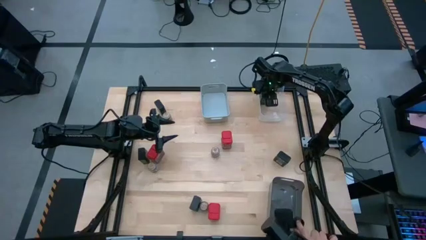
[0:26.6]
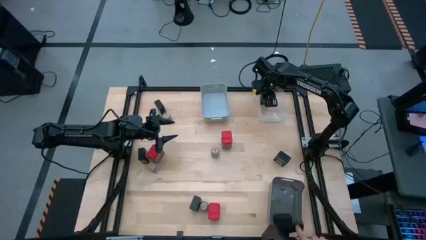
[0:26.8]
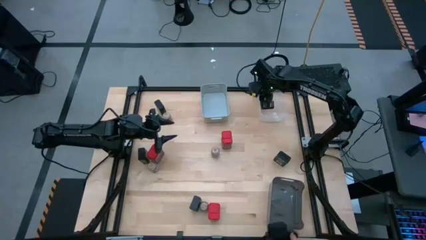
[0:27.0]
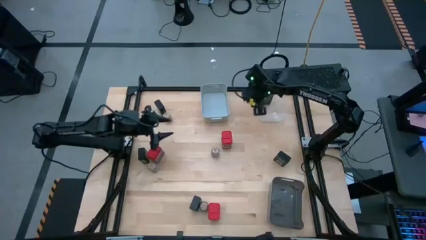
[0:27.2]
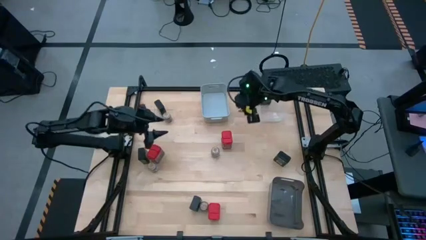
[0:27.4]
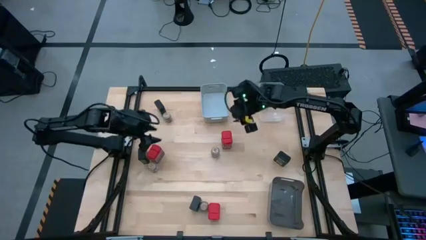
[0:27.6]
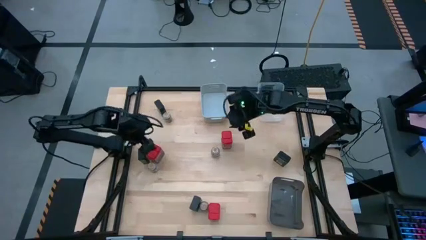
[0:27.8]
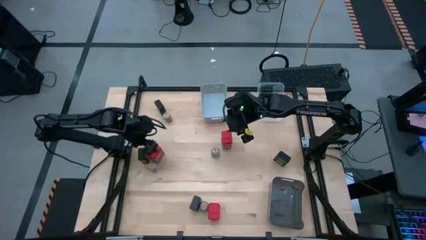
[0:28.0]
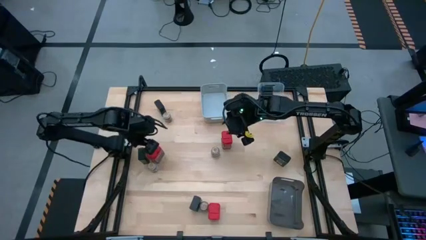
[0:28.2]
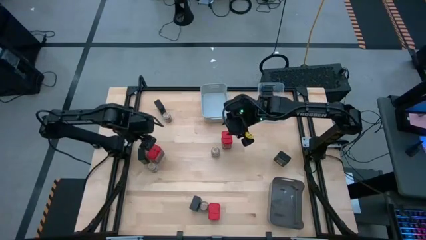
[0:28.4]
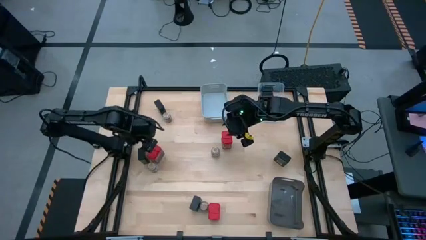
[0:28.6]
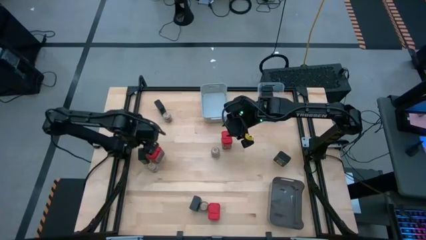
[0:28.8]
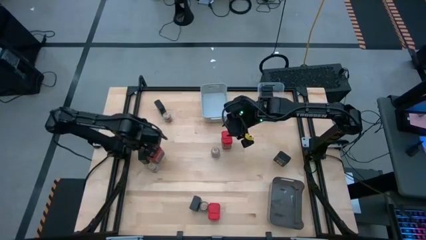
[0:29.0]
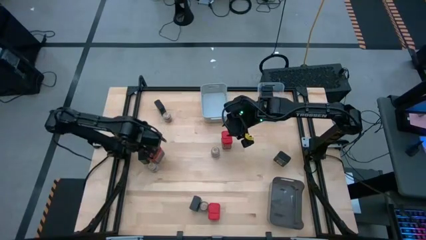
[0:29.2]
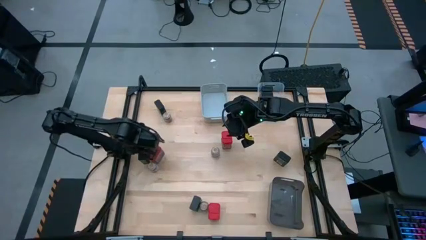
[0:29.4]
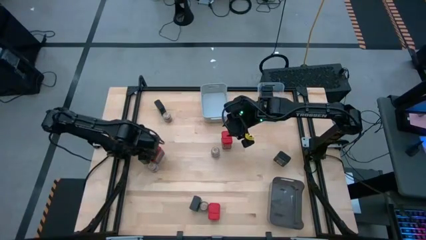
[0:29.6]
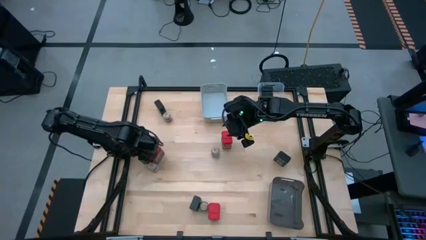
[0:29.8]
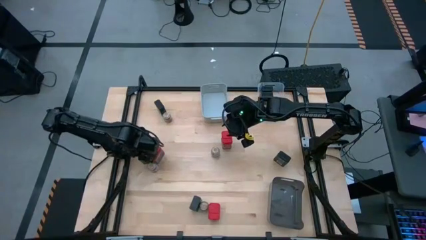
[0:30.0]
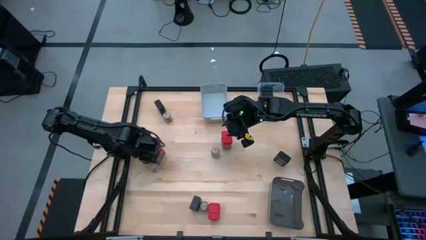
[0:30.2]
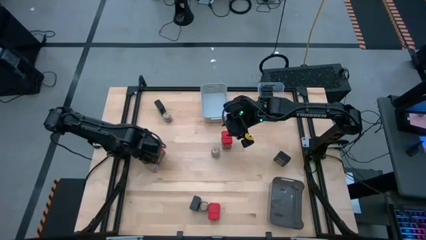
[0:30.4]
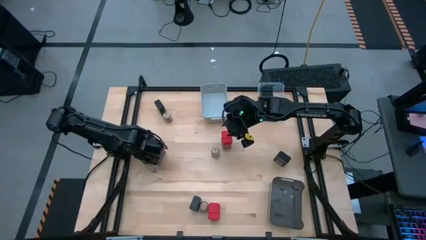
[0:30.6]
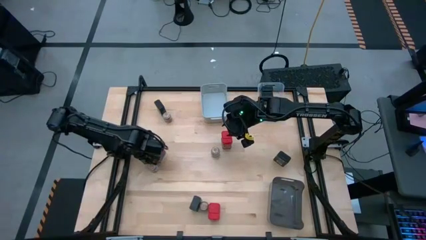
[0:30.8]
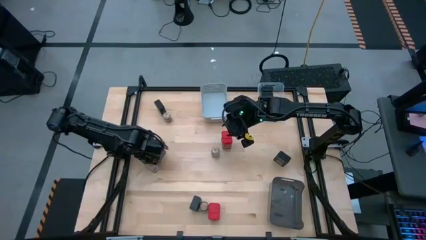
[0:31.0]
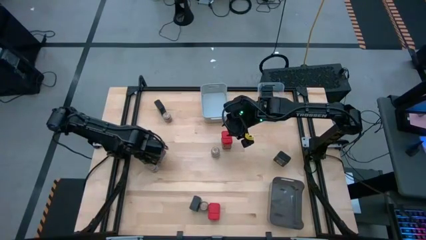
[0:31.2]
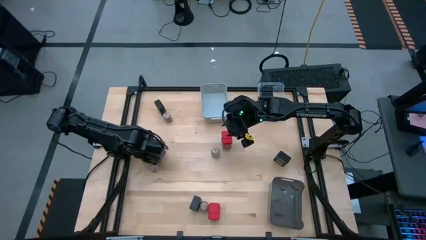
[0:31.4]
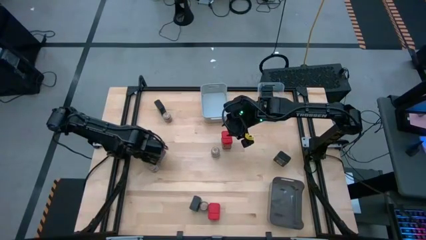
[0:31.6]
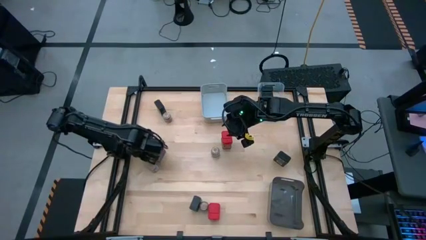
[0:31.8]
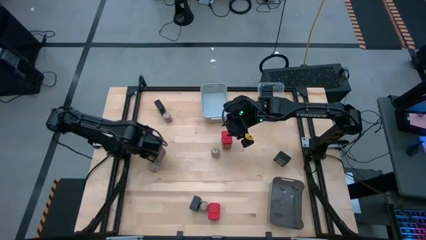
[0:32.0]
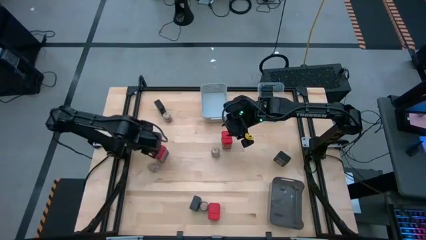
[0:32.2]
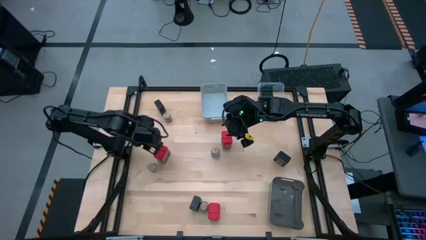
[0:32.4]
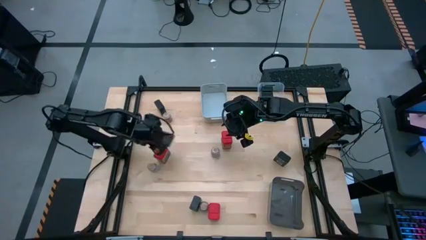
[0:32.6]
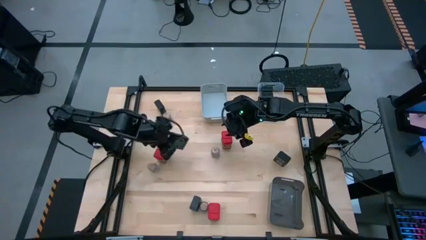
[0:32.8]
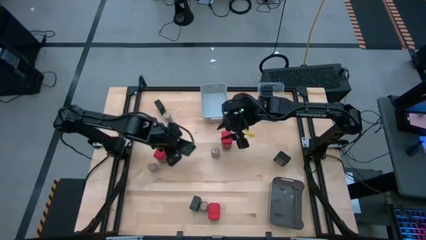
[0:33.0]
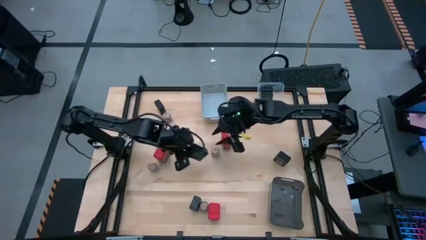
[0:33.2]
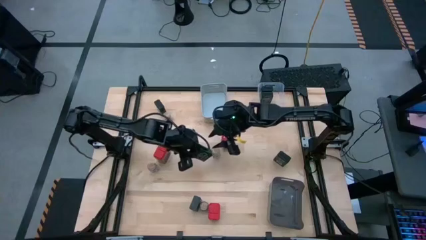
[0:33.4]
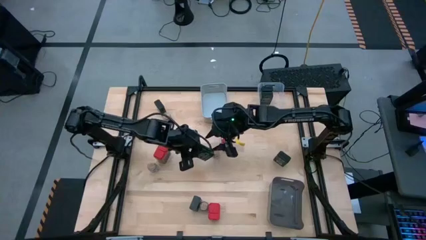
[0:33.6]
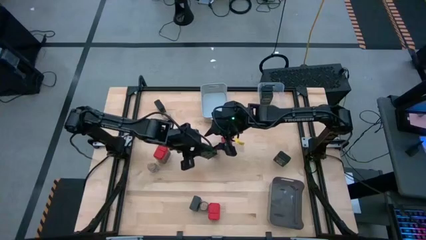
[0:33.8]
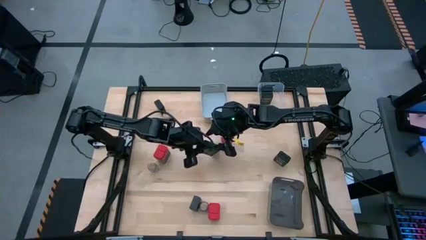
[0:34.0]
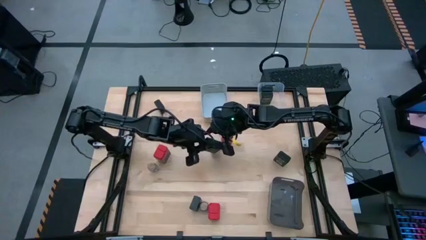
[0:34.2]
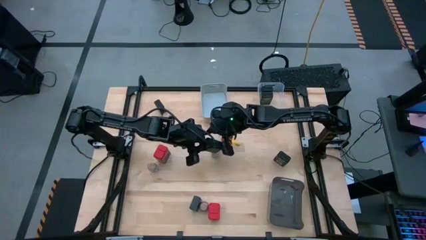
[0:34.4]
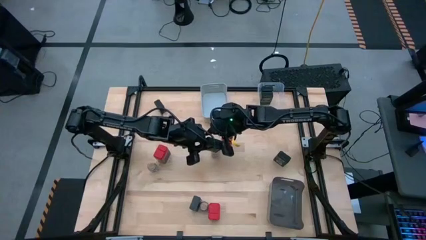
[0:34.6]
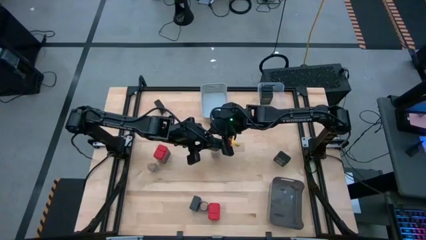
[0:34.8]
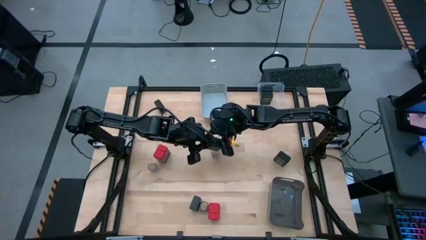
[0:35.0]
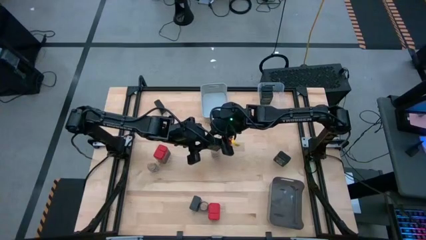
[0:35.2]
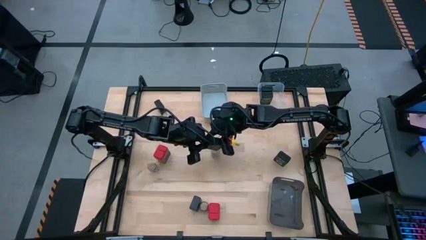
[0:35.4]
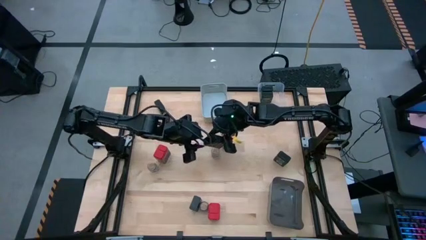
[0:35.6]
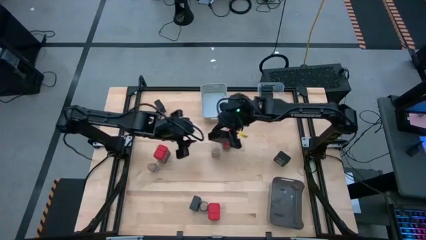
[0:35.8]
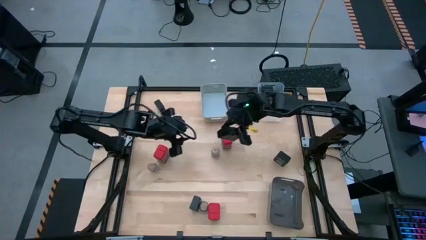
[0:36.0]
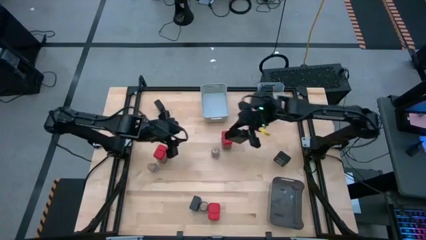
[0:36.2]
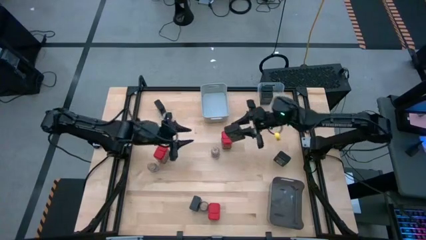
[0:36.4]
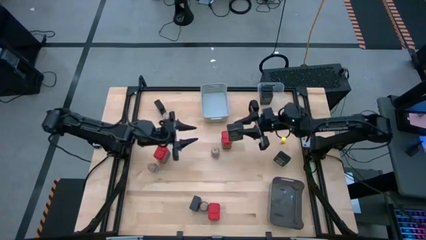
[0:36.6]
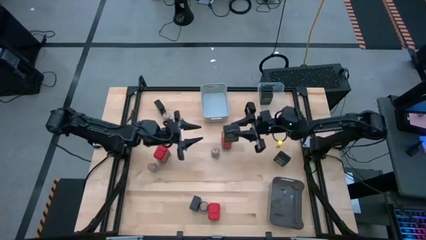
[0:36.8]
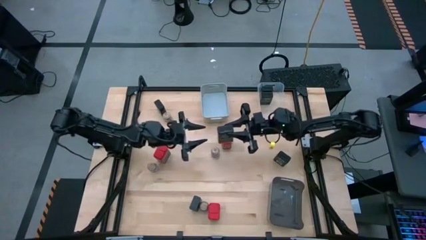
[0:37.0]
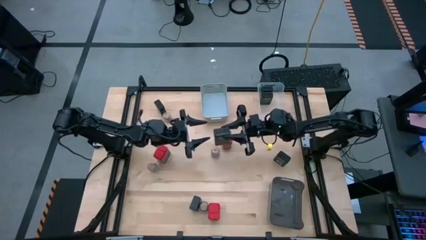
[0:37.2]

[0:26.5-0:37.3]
Task: Sort spices by type
Put the black seasoning can into the transparent bin
